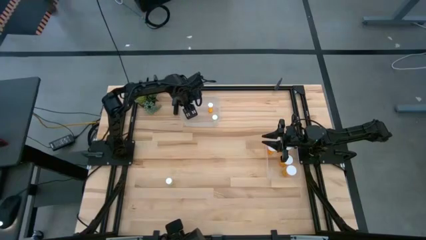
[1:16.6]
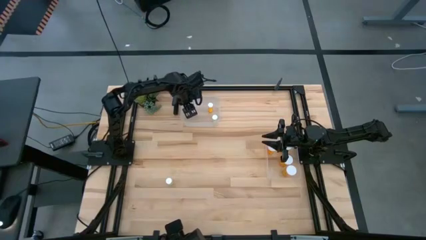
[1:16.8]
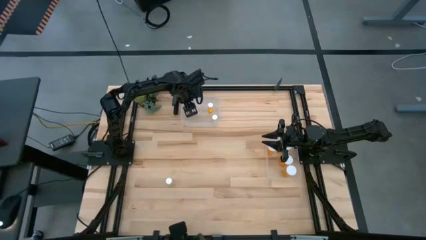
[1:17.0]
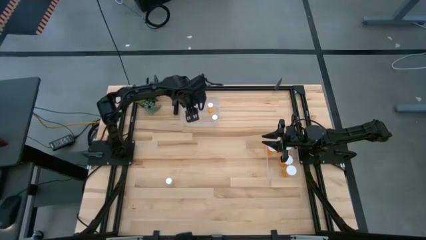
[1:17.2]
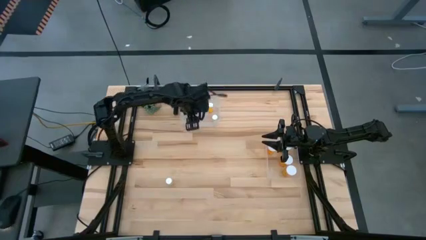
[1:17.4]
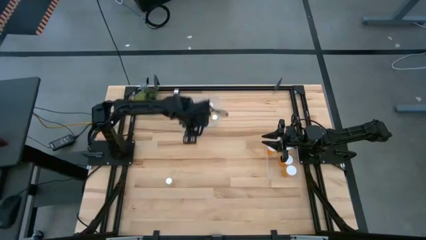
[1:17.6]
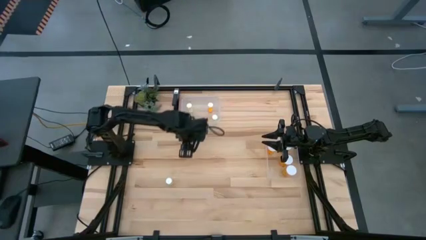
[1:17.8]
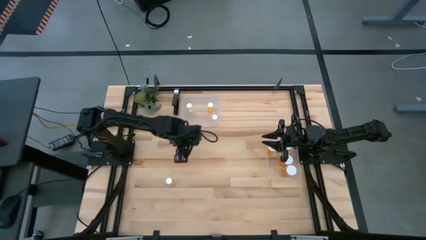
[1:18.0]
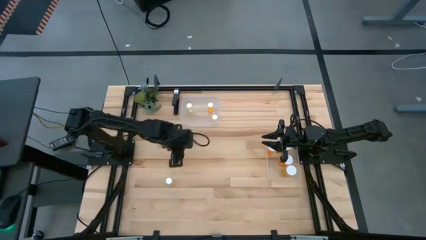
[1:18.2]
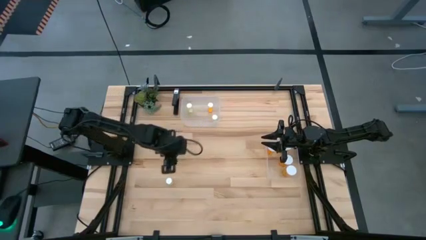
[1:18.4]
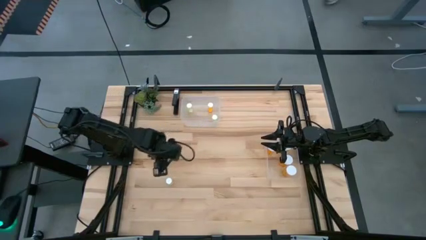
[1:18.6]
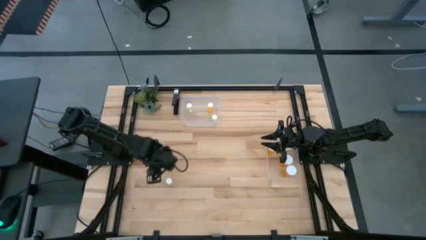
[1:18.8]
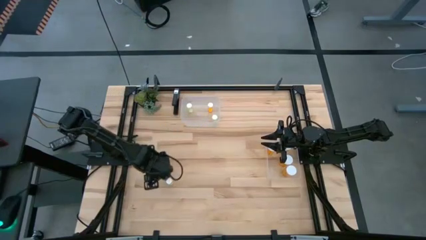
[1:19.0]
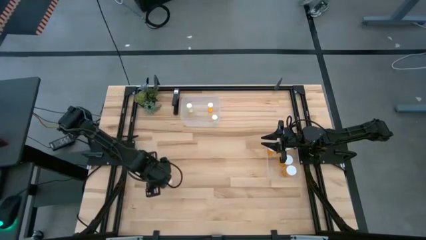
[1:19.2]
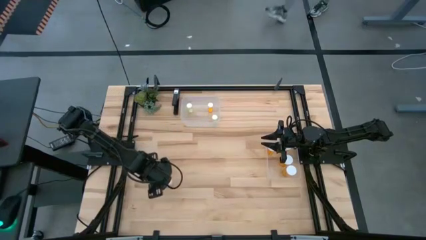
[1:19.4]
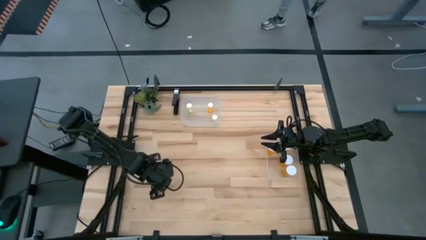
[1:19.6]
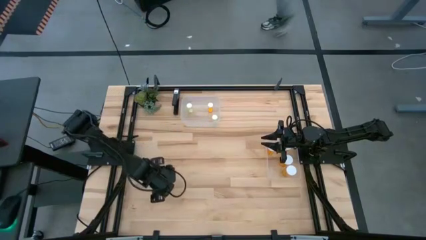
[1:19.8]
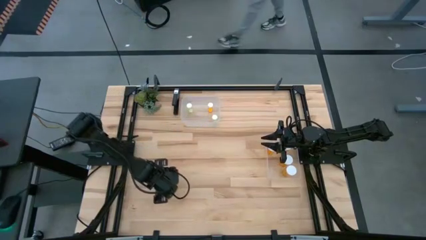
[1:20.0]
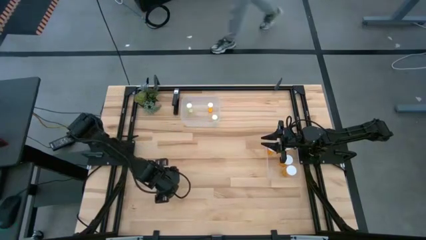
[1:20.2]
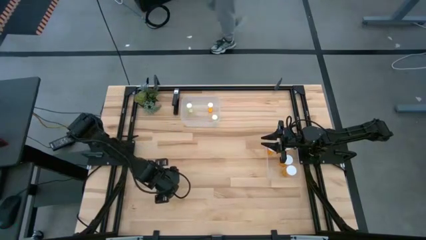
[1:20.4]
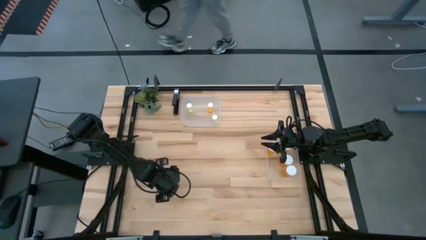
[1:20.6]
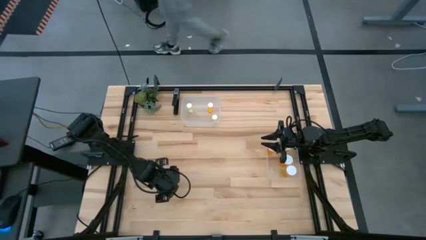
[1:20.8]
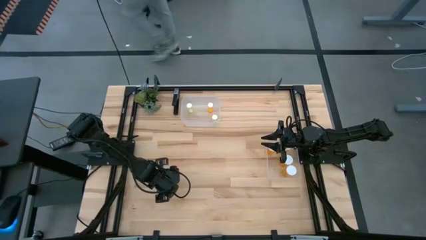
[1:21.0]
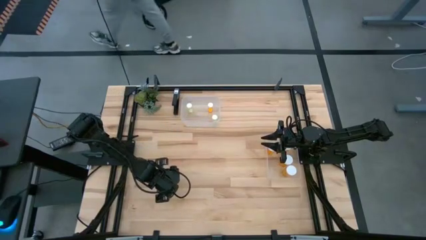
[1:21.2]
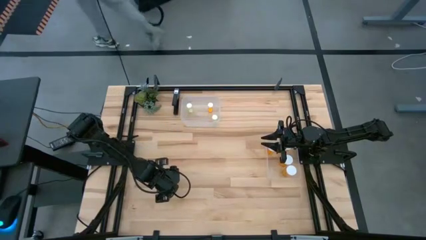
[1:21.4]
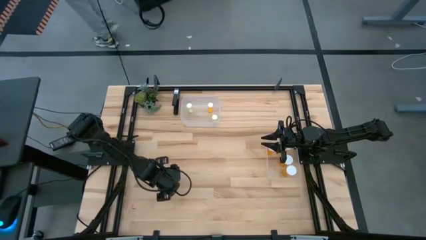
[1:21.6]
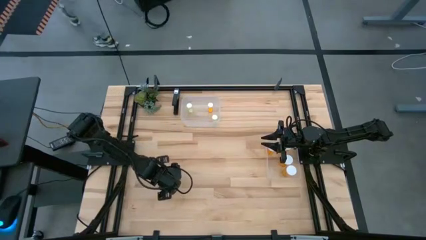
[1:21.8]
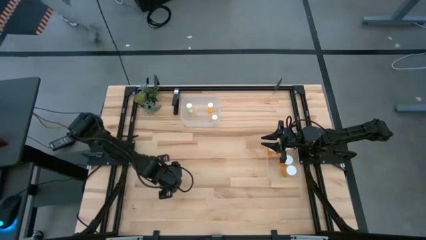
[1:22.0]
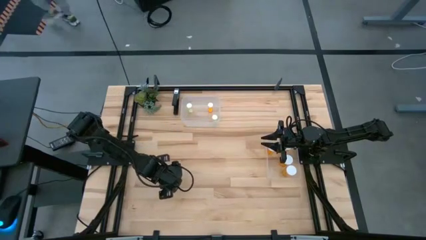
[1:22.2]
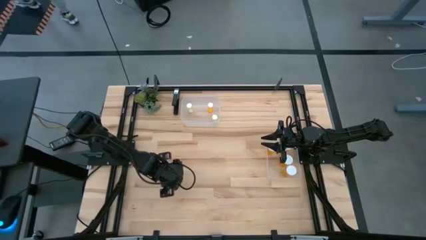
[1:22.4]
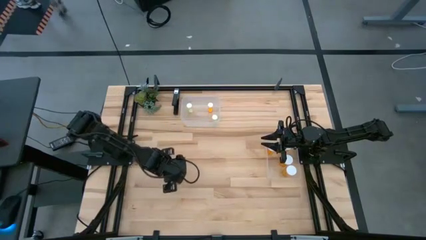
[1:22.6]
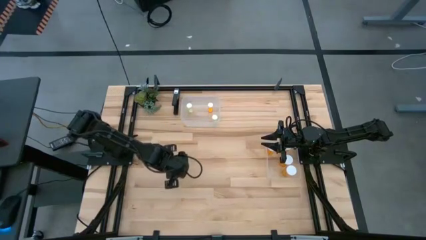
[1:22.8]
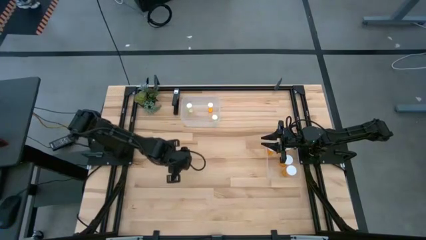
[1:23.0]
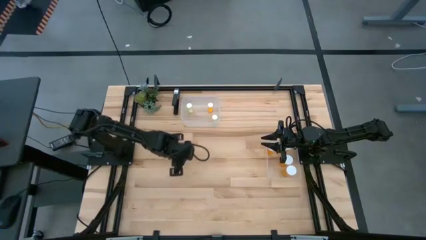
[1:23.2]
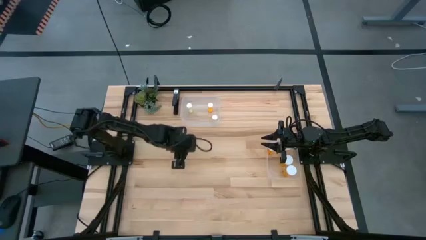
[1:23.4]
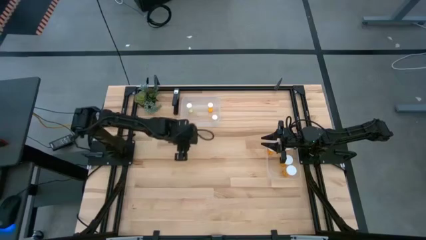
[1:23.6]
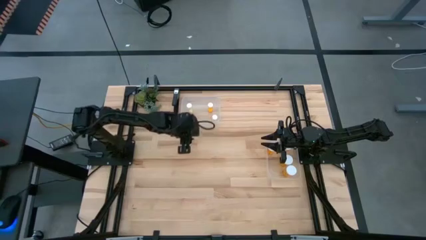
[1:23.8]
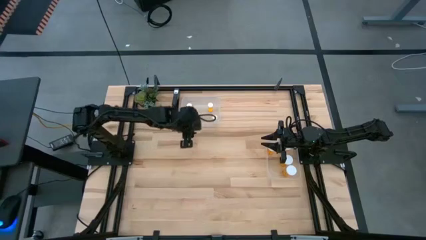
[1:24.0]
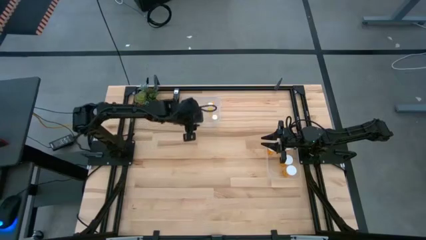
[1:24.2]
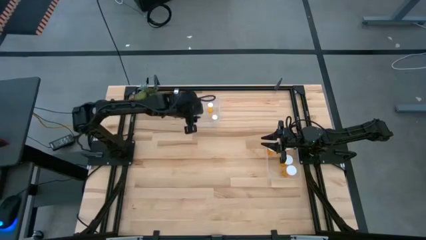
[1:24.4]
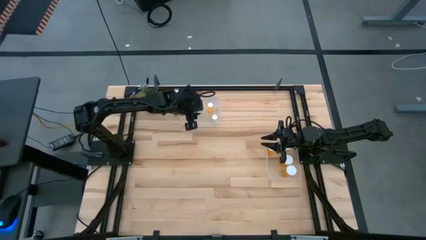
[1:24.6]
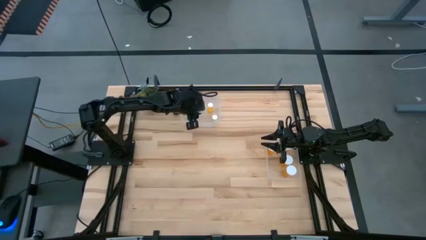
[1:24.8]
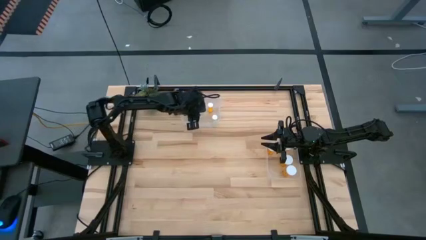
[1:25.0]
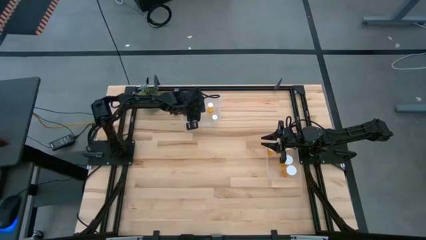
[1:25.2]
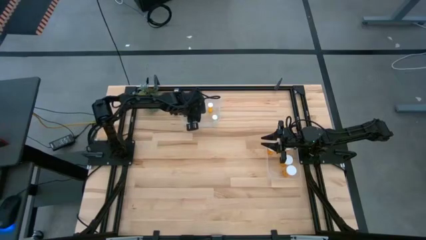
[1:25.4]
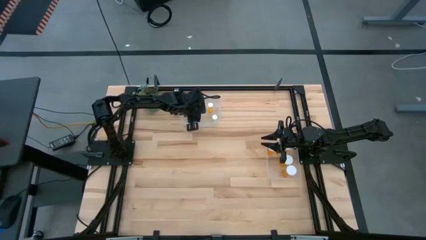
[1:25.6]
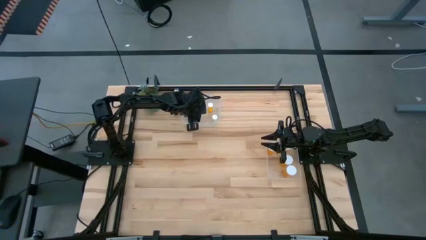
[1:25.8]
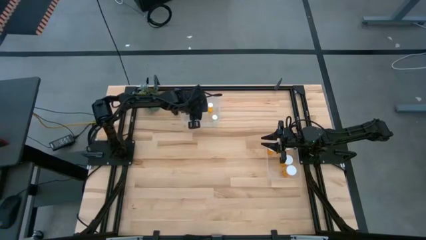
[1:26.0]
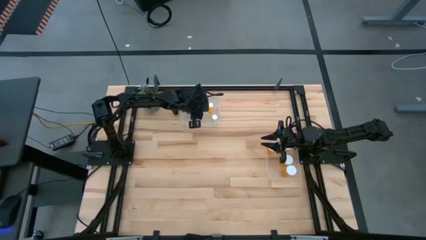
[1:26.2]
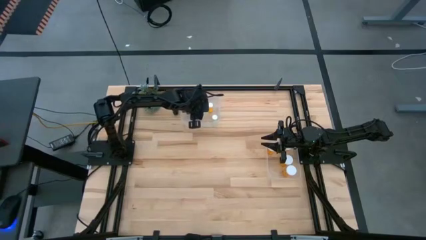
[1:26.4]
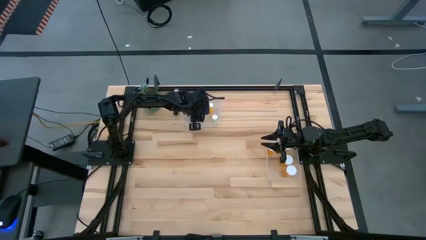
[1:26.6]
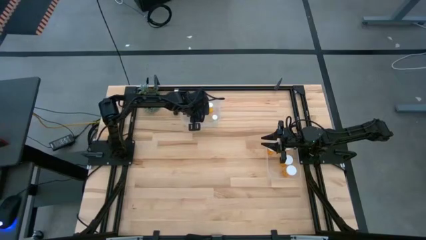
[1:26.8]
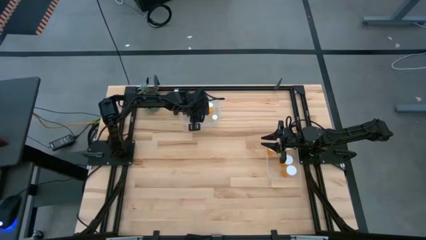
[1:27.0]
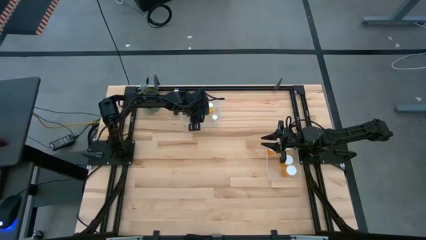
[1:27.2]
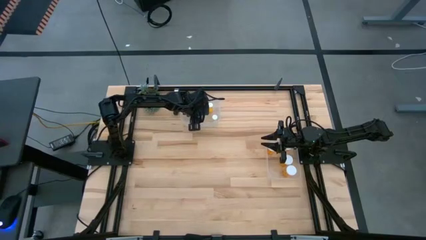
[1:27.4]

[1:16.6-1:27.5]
Task: Pick and place medicine bottles into bin by pill shape (circle, oval)
Put the small yellow pill bottle into the top transparent bin
